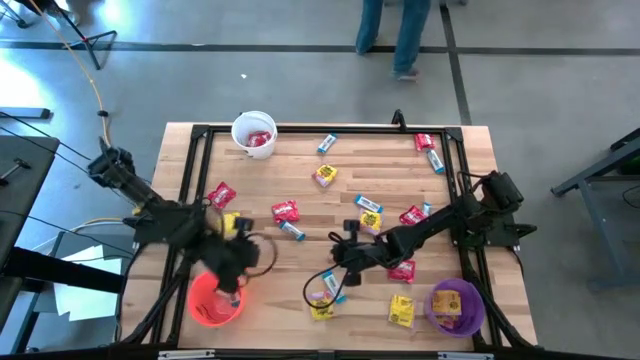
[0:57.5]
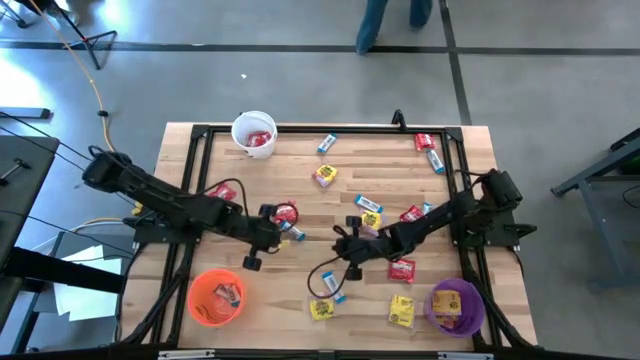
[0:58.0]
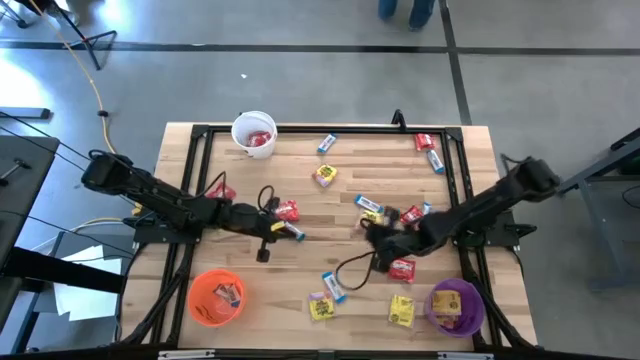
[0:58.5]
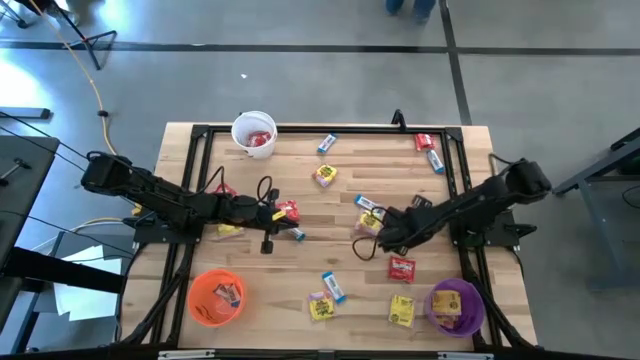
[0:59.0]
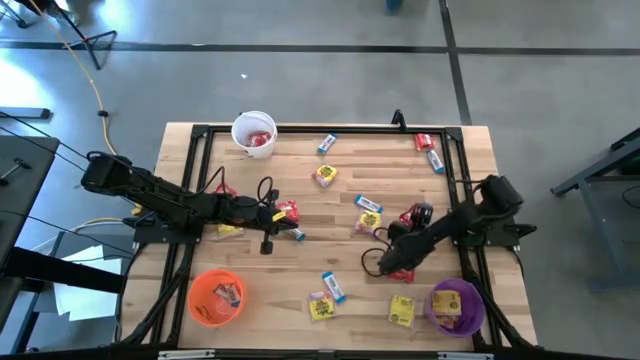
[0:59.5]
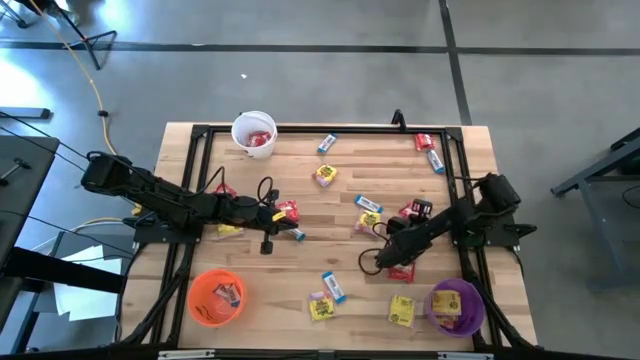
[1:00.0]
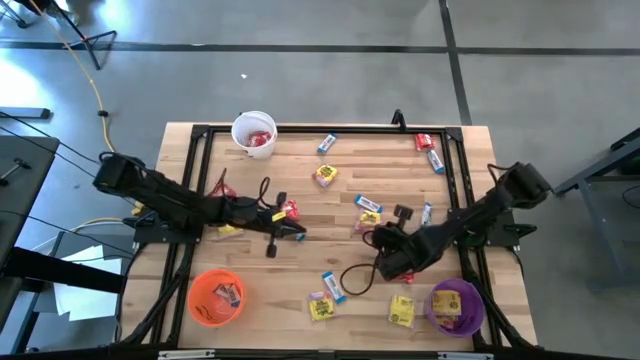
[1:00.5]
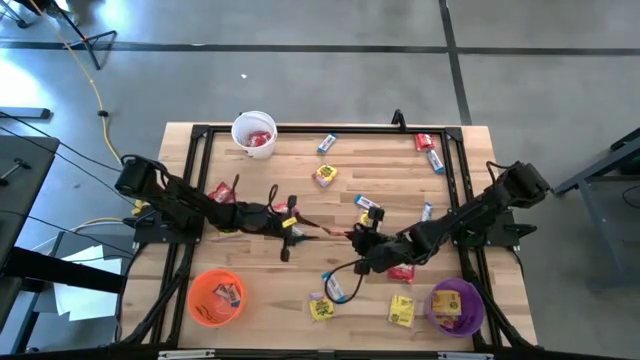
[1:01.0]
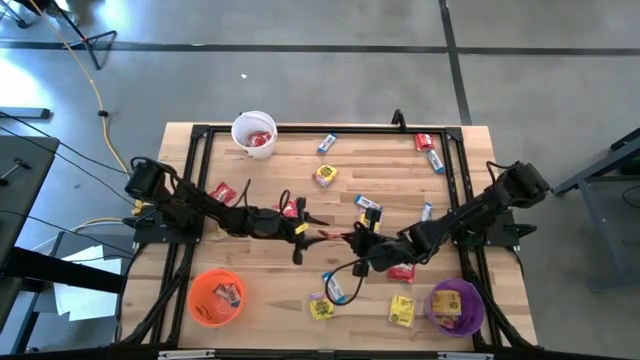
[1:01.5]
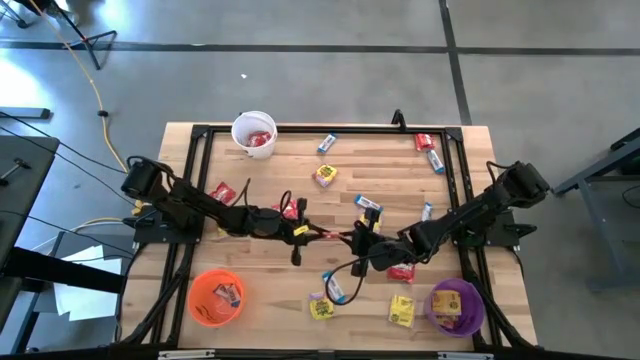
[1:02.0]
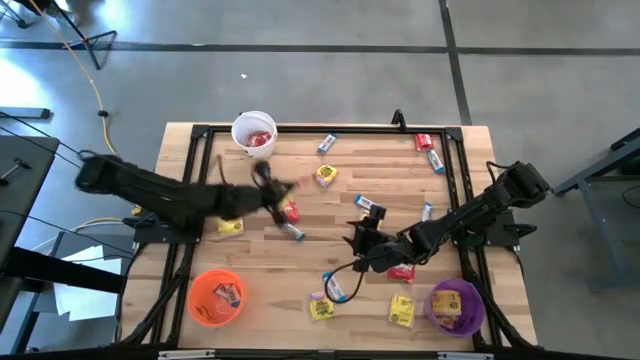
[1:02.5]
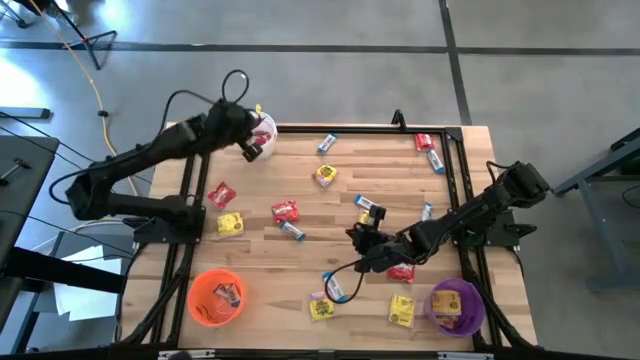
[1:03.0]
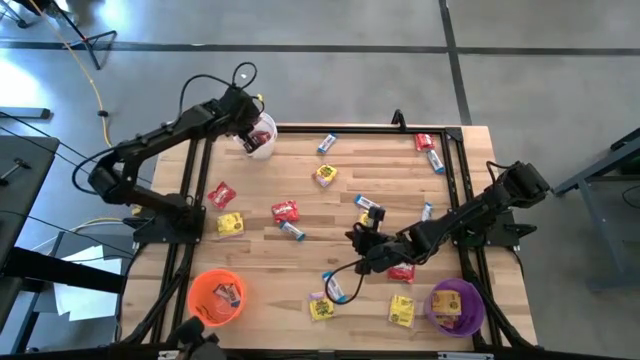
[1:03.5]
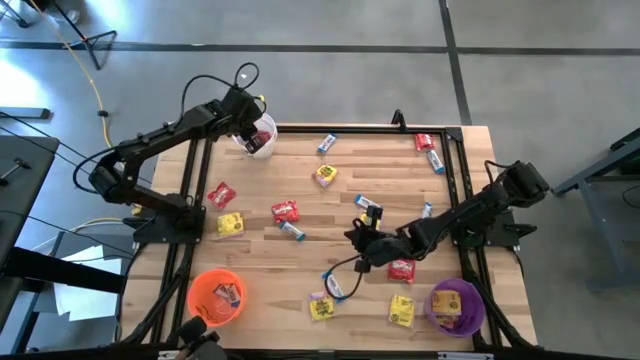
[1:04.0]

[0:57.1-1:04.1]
Task: Sort candy
Put the red candy into the white bucket

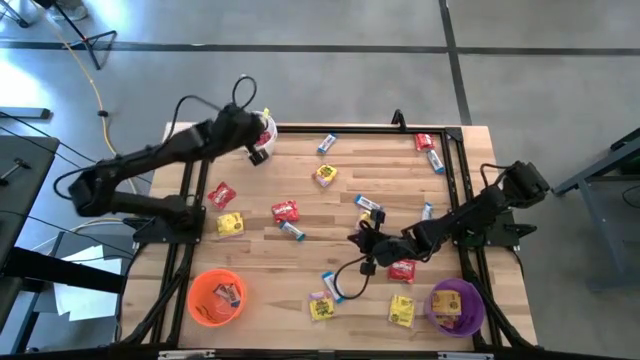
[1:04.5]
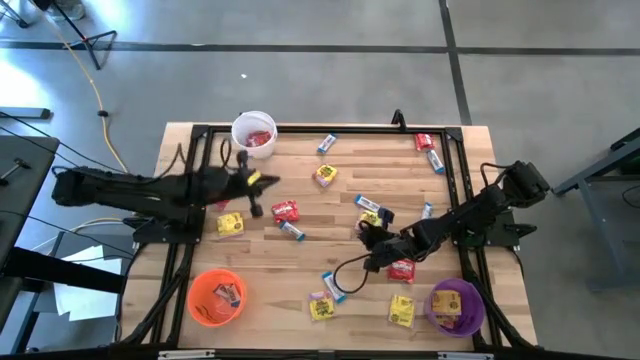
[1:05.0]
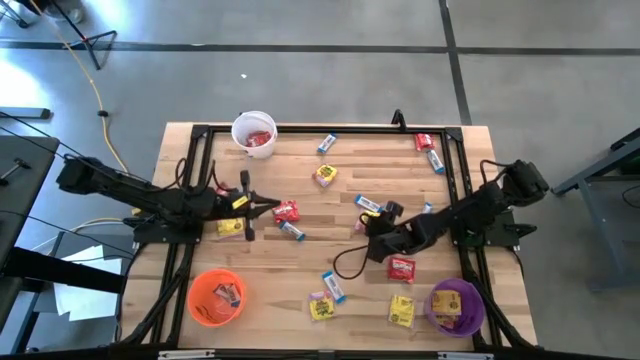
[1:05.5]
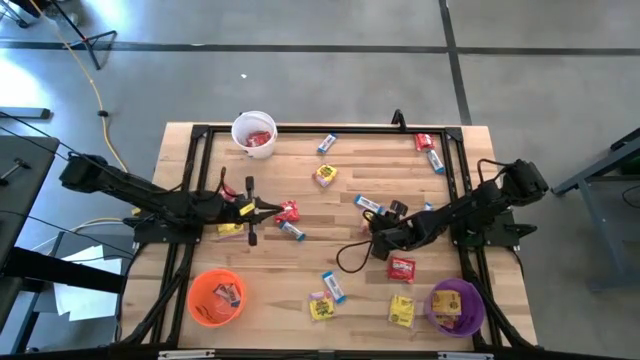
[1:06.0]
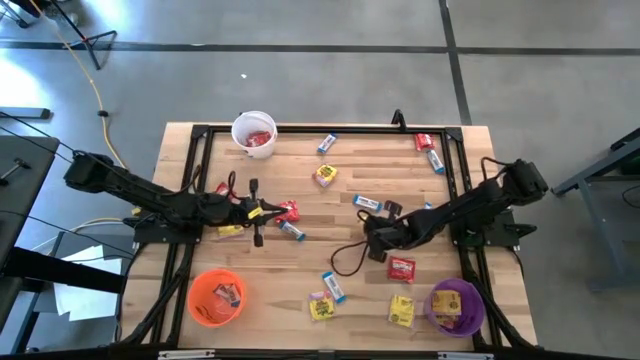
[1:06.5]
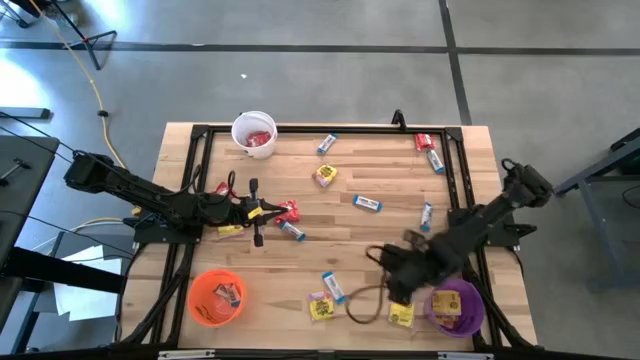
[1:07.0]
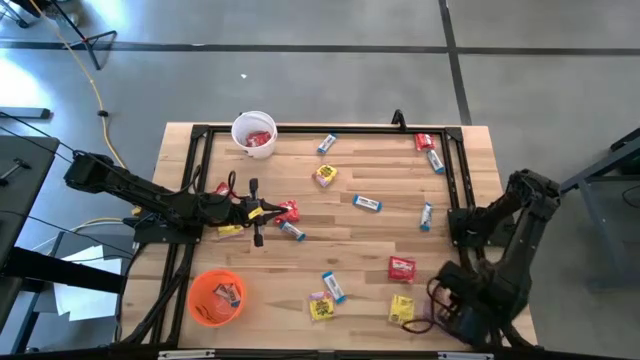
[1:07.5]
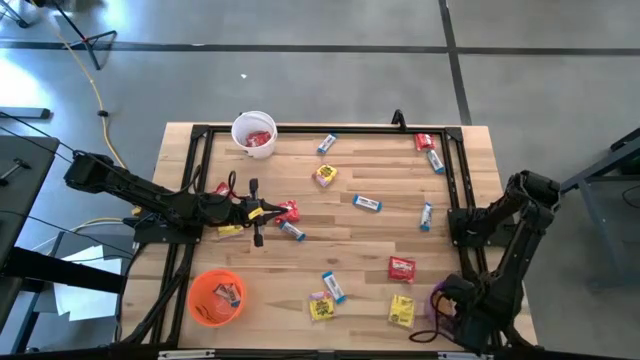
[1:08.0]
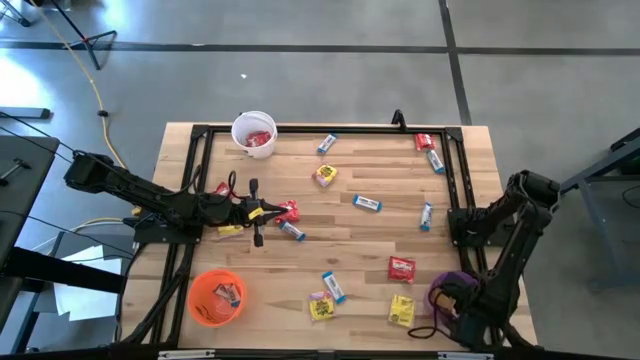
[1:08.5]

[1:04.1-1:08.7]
Put the yellow candy into the purple bucket

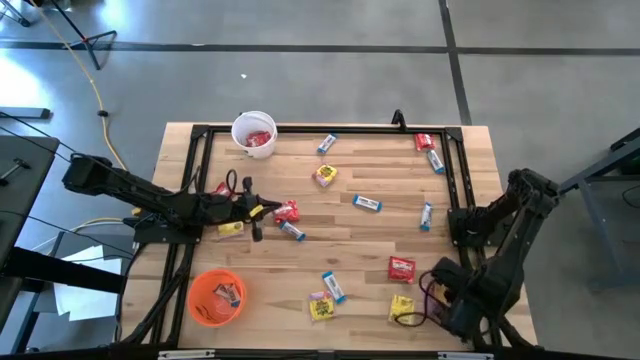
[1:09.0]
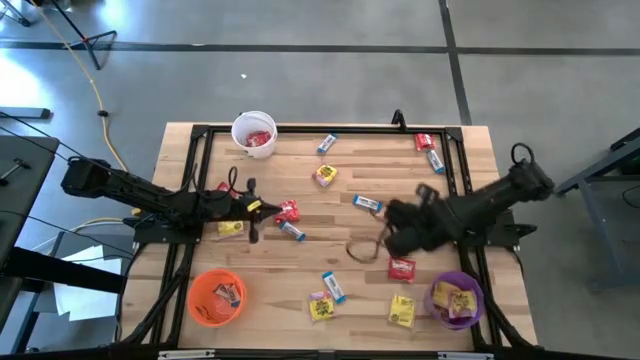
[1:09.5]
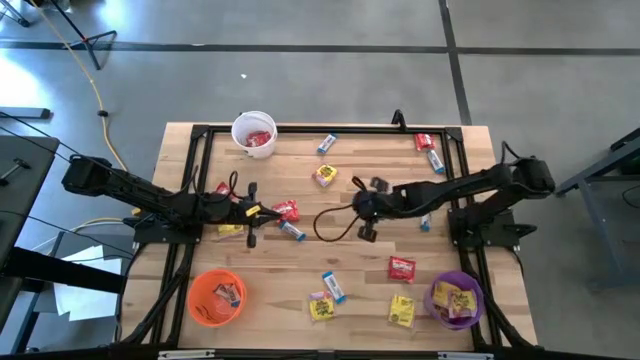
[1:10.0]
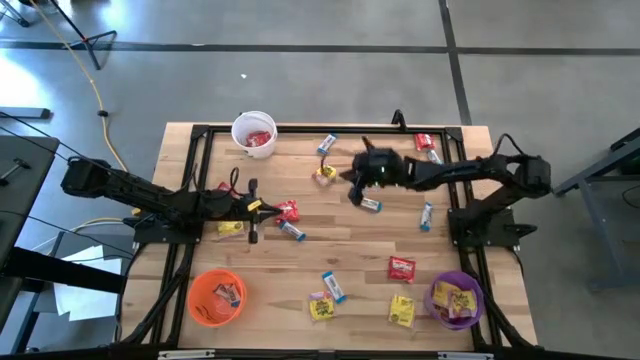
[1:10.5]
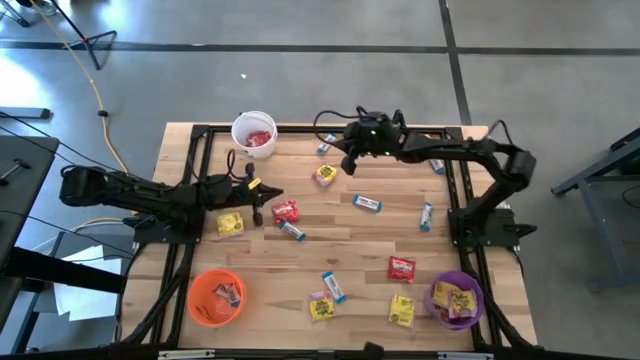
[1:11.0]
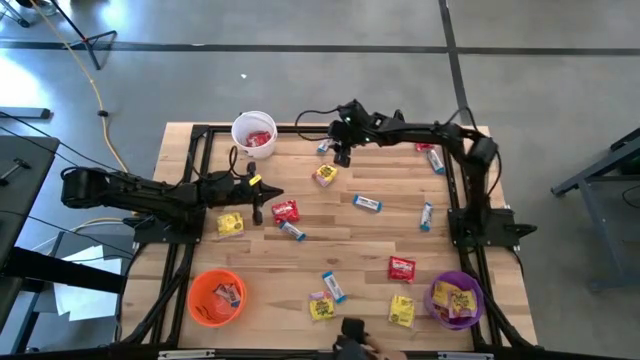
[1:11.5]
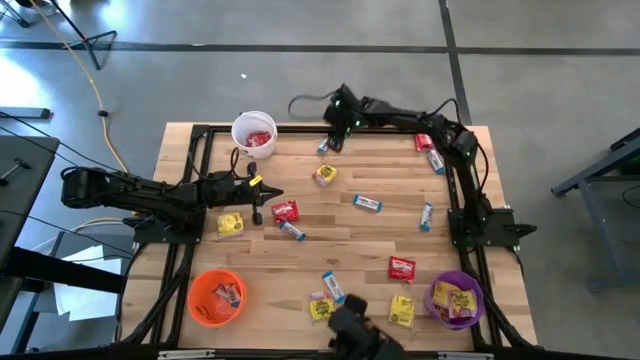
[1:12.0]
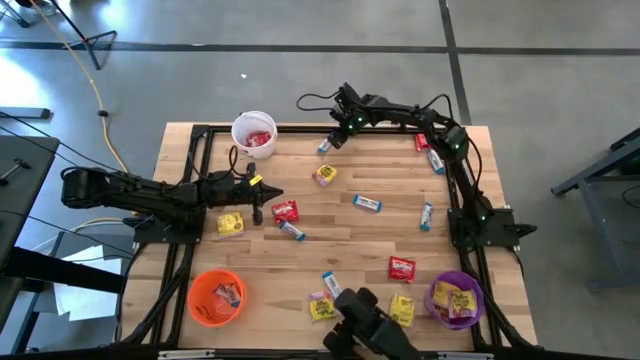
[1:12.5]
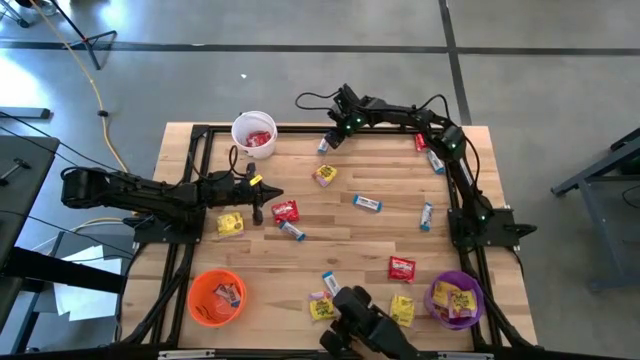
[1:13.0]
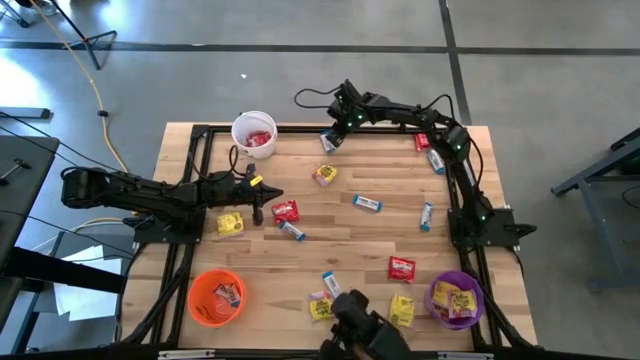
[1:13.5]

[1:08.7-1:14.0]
Put the white candy into the orange bucket

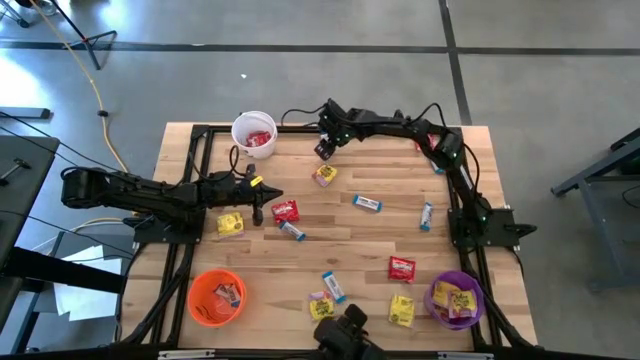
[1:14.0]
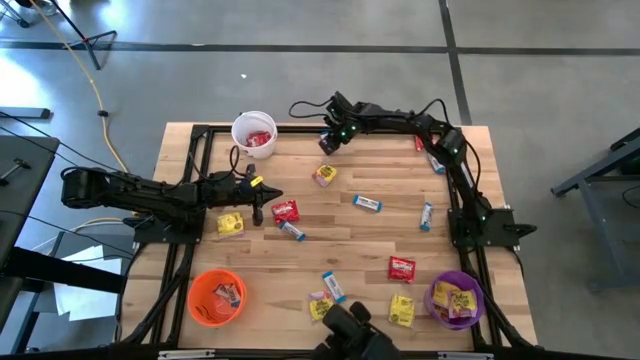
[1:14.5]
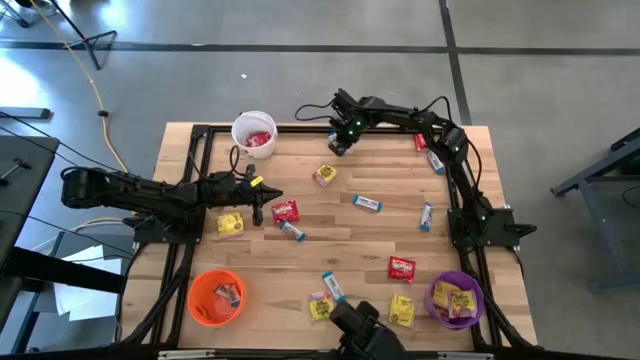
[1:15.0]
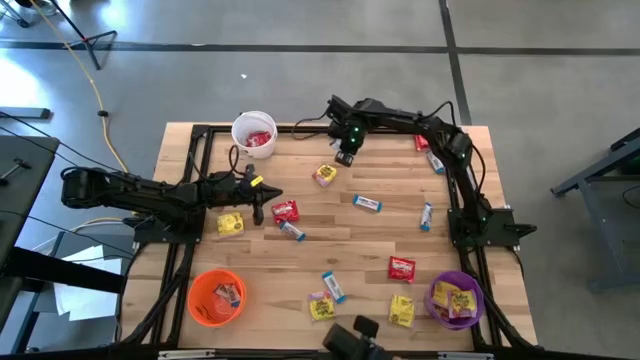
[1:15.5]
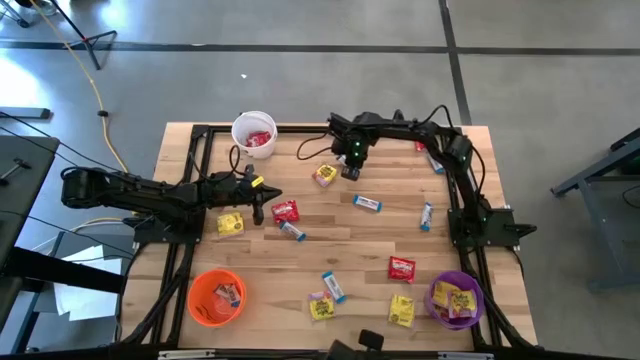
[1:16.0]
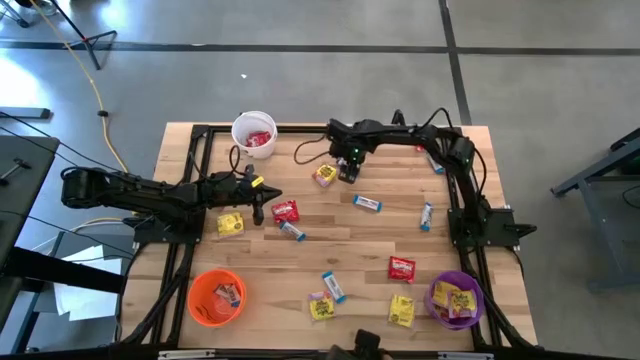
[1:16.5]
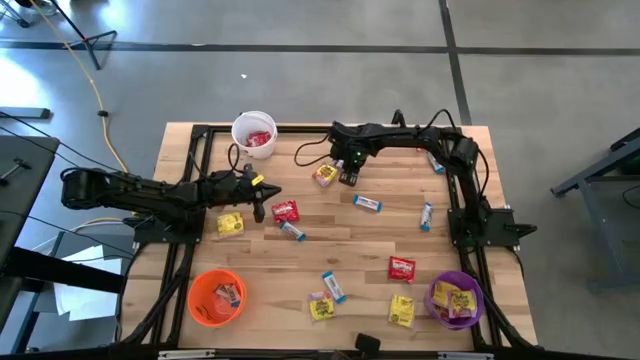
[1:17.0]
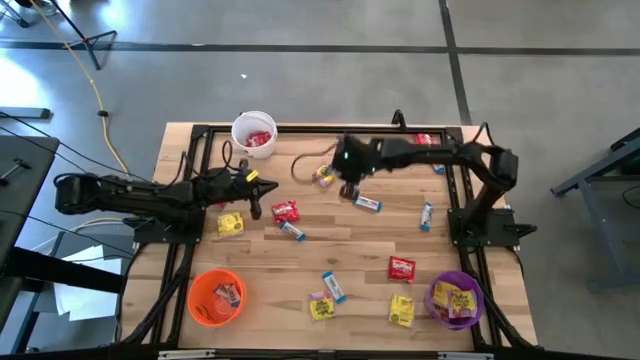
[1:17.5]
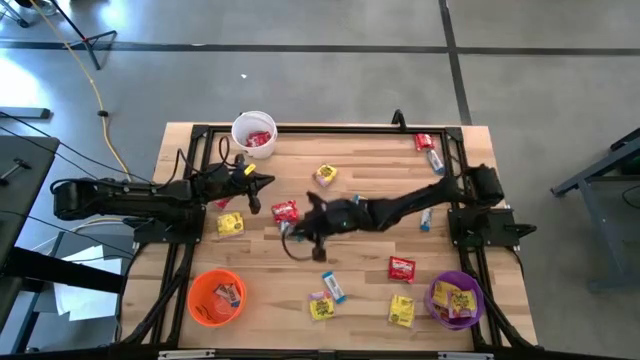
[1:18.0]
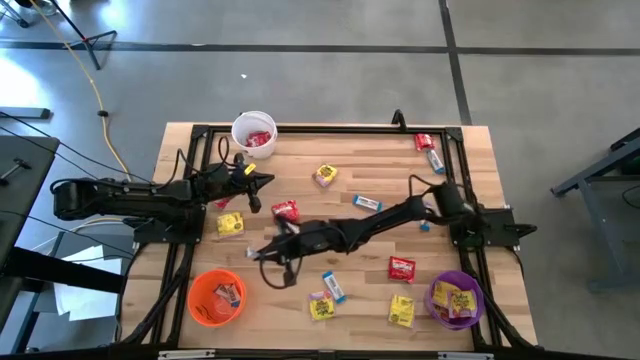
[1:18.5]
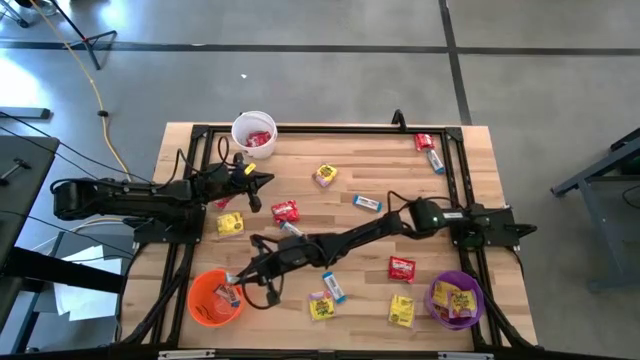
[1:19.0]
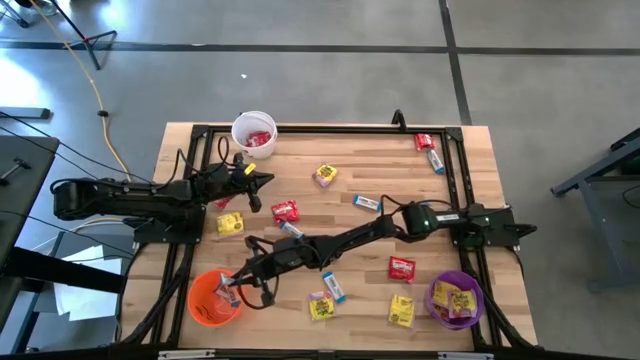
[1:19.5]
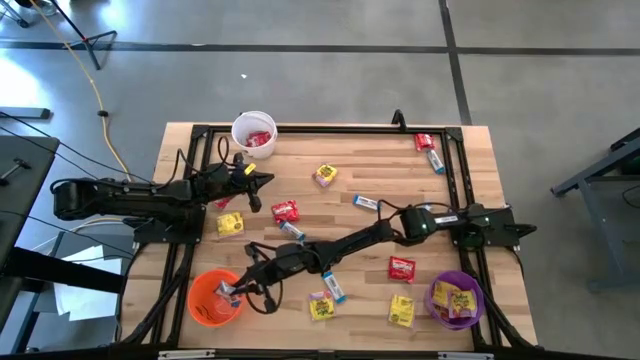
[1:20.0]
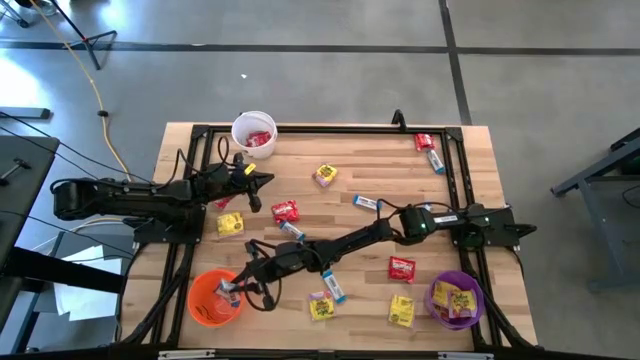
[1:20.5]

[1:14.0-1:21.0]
Put the white candy into the orange bucket
